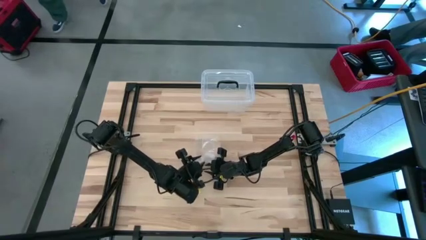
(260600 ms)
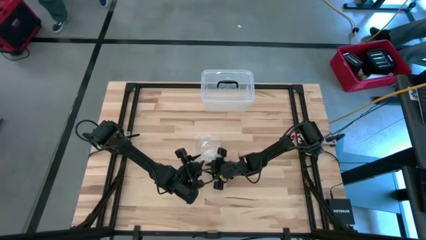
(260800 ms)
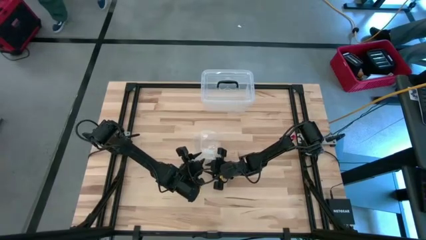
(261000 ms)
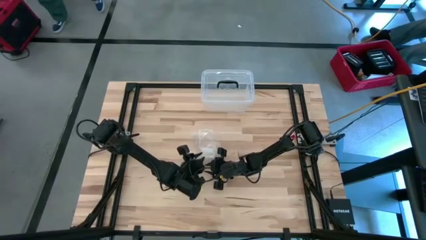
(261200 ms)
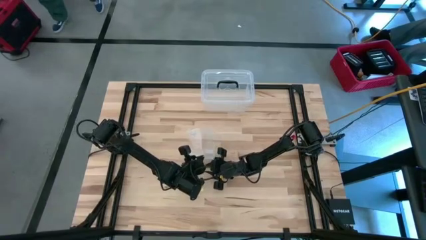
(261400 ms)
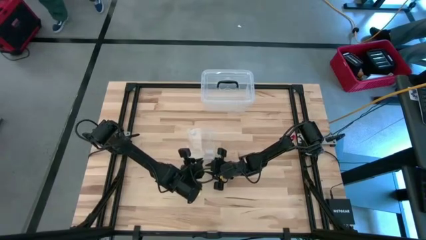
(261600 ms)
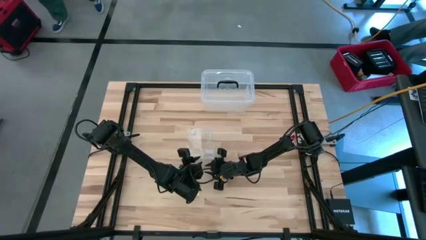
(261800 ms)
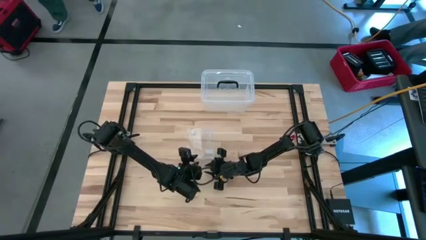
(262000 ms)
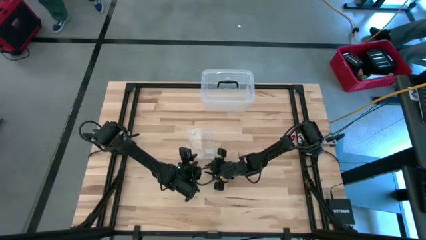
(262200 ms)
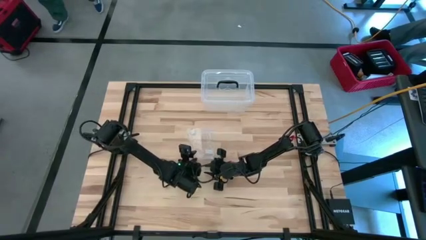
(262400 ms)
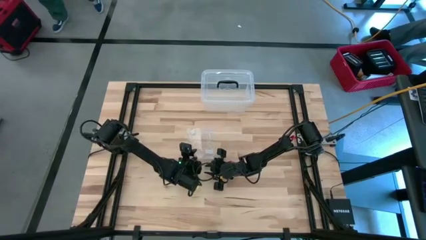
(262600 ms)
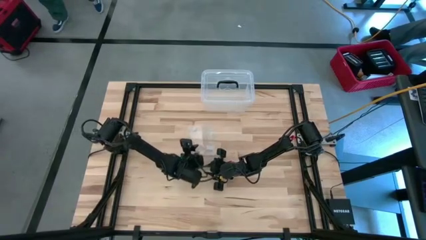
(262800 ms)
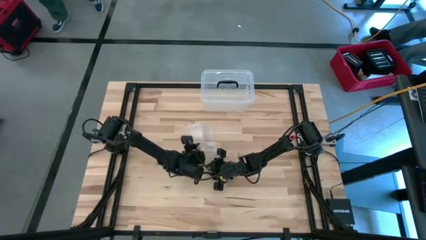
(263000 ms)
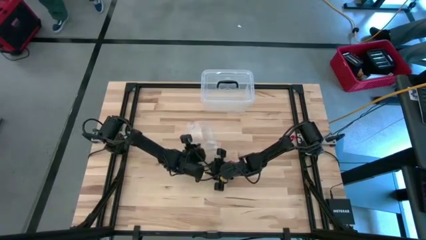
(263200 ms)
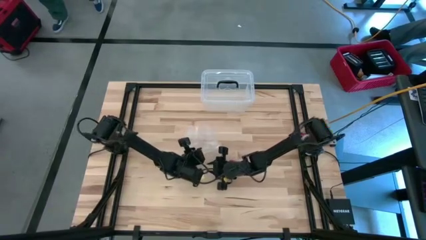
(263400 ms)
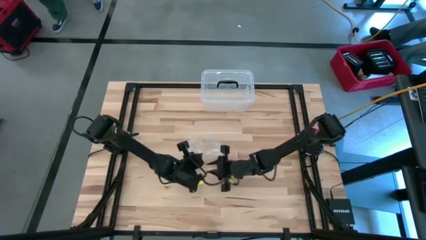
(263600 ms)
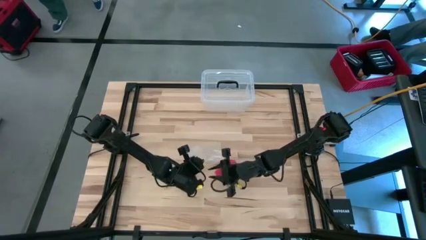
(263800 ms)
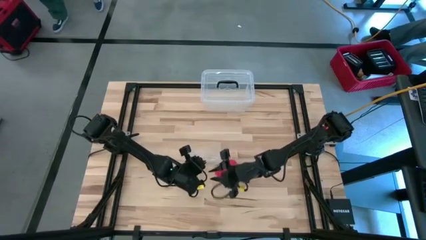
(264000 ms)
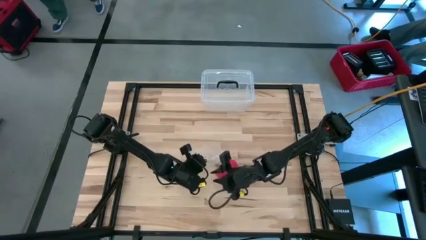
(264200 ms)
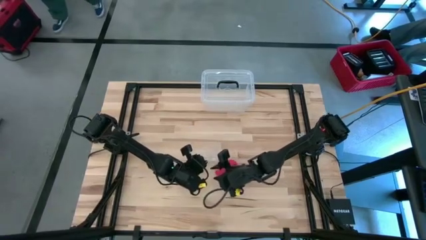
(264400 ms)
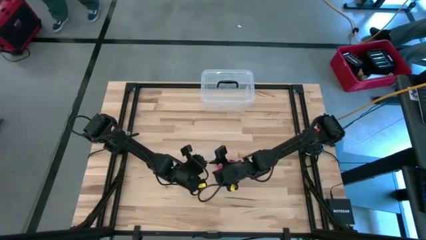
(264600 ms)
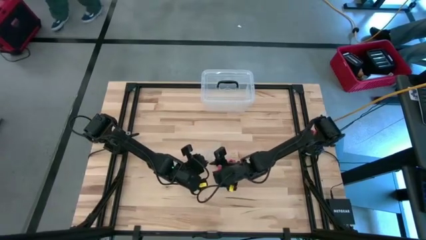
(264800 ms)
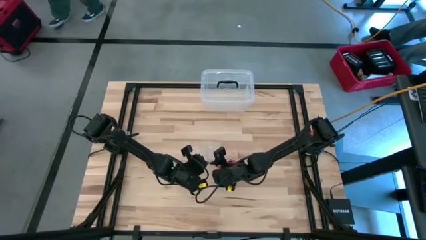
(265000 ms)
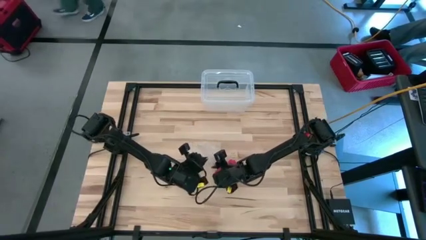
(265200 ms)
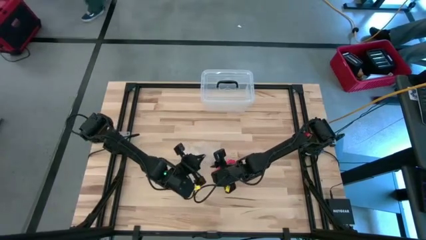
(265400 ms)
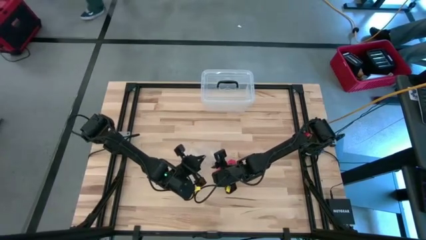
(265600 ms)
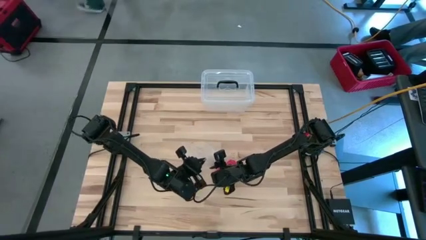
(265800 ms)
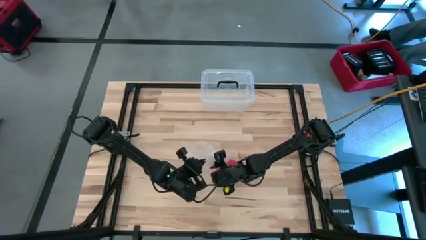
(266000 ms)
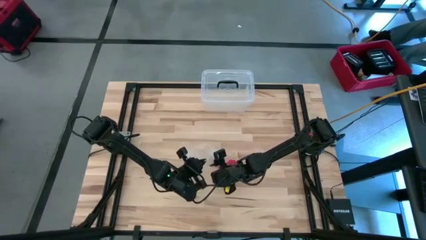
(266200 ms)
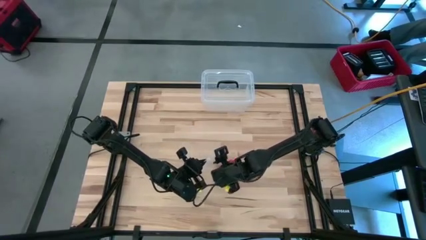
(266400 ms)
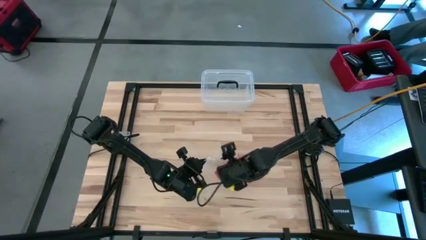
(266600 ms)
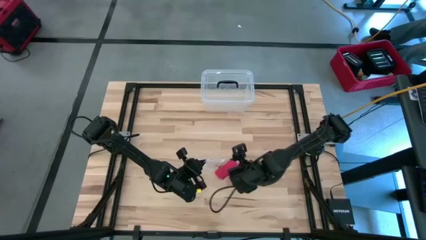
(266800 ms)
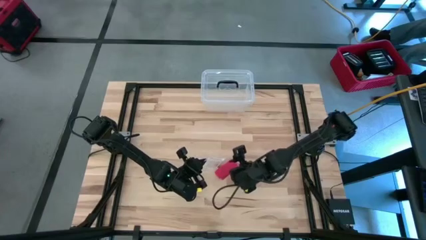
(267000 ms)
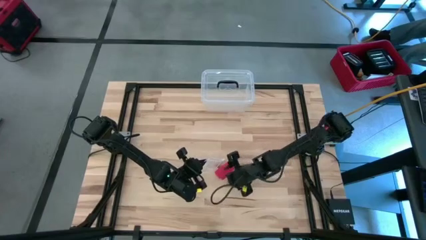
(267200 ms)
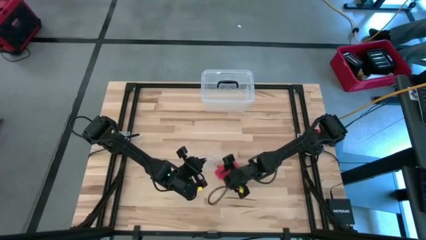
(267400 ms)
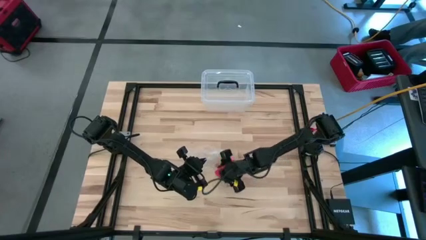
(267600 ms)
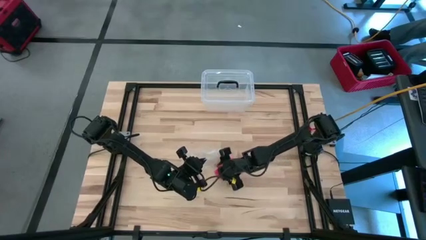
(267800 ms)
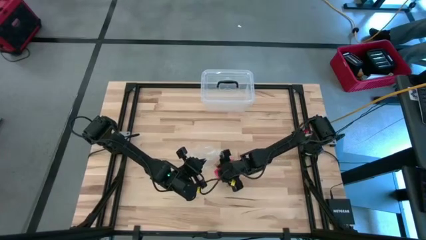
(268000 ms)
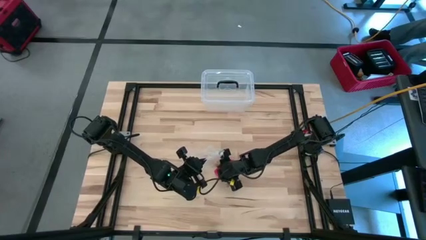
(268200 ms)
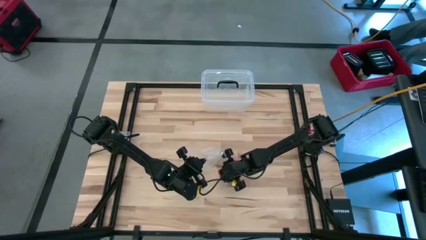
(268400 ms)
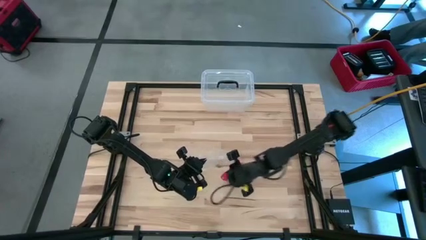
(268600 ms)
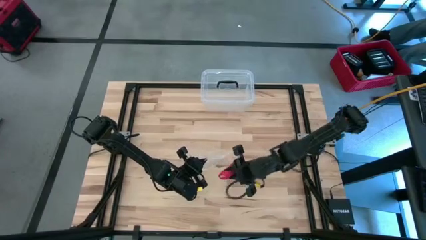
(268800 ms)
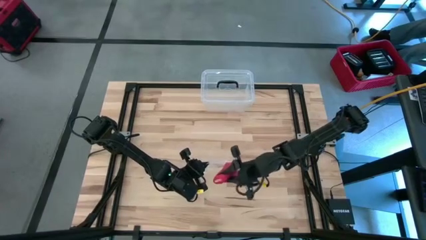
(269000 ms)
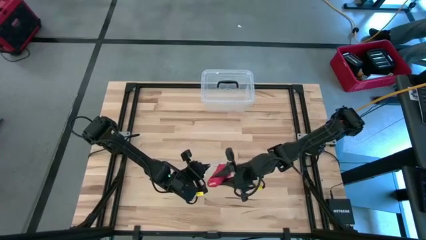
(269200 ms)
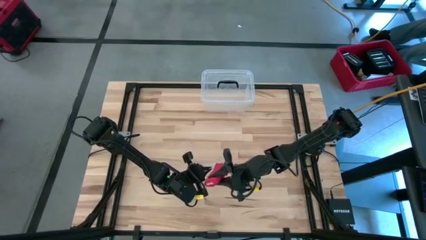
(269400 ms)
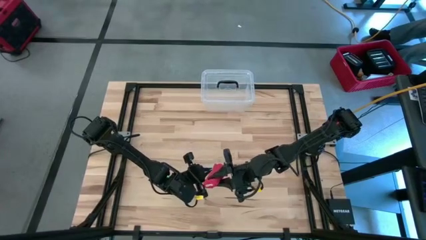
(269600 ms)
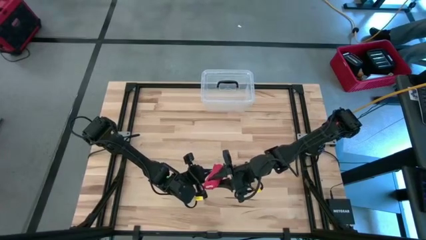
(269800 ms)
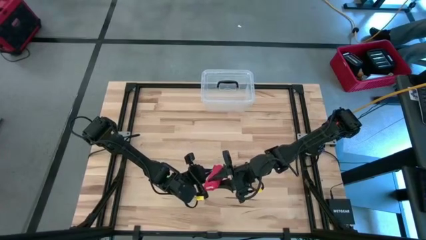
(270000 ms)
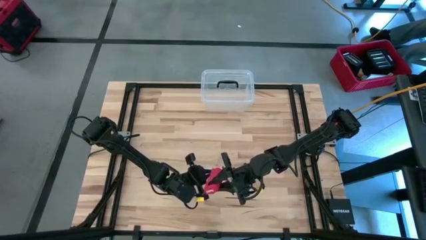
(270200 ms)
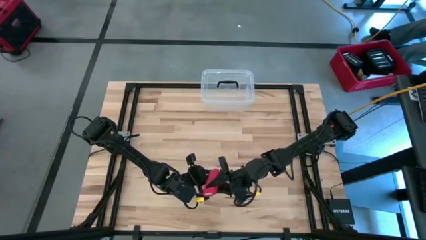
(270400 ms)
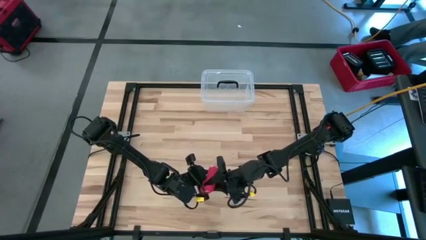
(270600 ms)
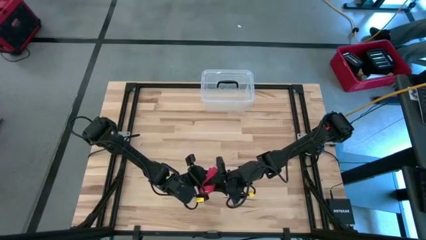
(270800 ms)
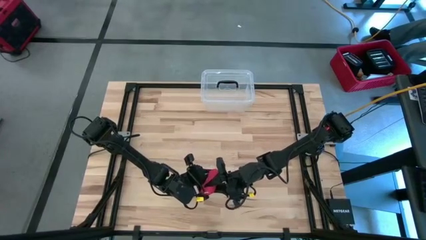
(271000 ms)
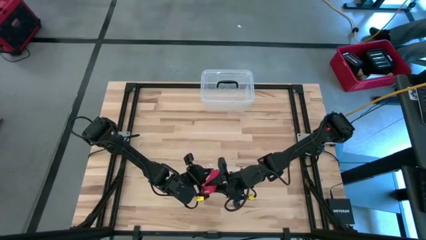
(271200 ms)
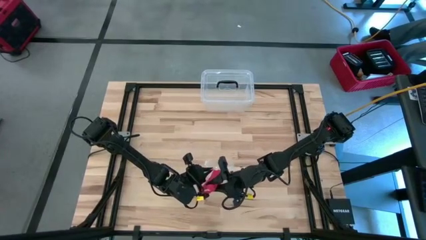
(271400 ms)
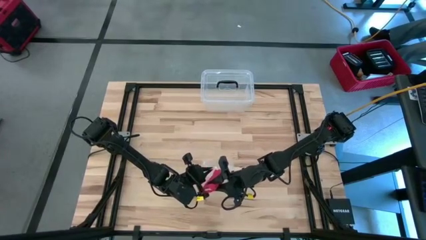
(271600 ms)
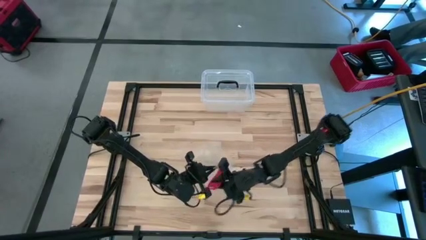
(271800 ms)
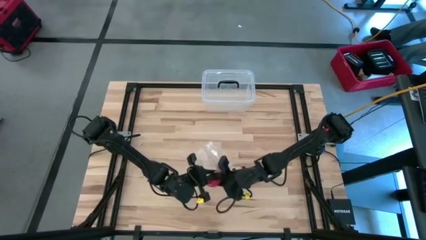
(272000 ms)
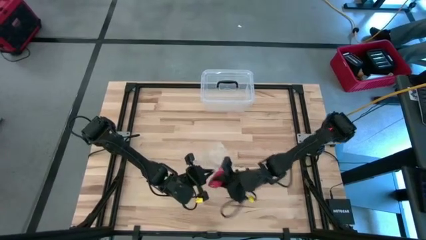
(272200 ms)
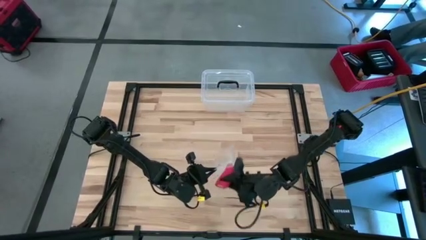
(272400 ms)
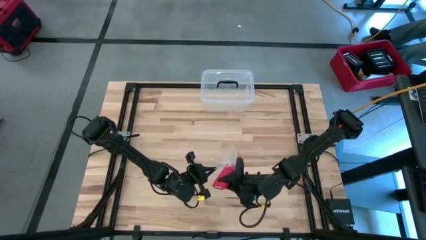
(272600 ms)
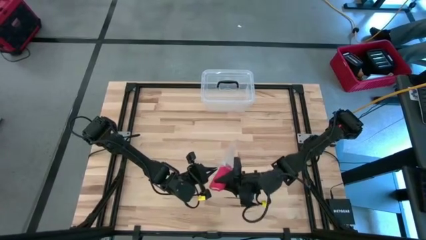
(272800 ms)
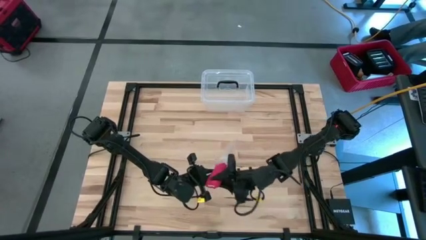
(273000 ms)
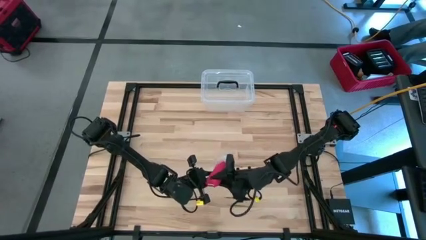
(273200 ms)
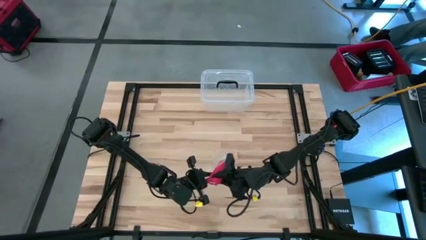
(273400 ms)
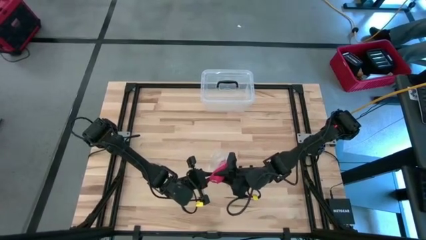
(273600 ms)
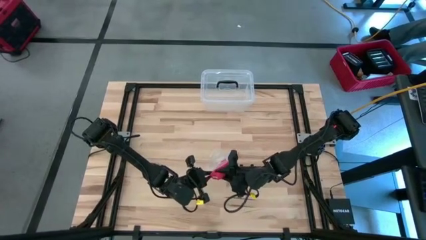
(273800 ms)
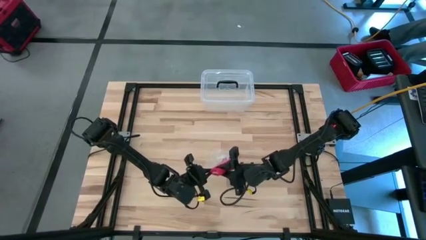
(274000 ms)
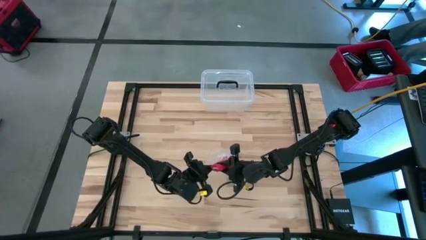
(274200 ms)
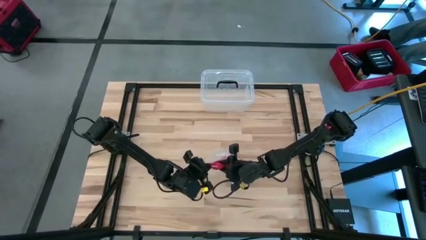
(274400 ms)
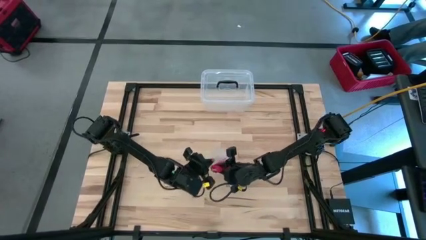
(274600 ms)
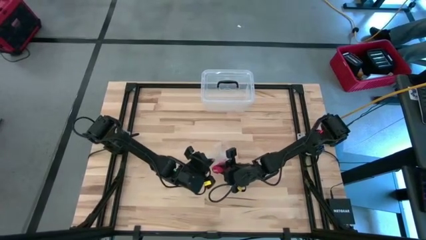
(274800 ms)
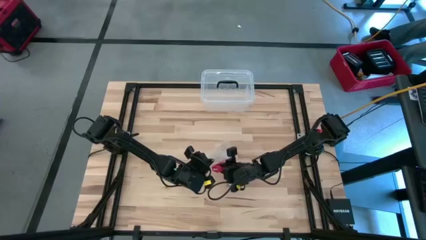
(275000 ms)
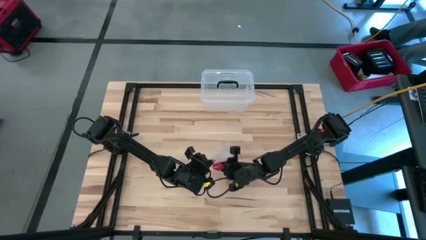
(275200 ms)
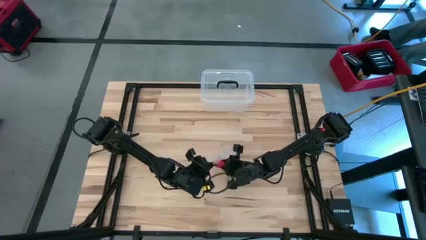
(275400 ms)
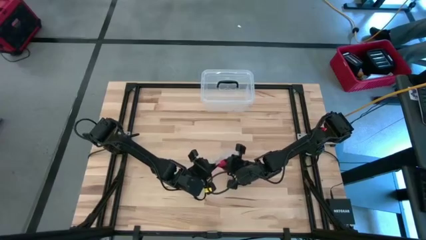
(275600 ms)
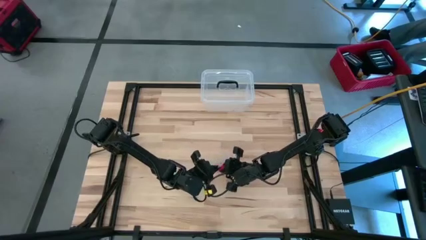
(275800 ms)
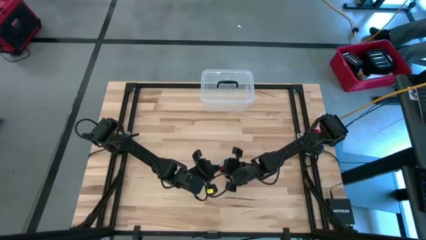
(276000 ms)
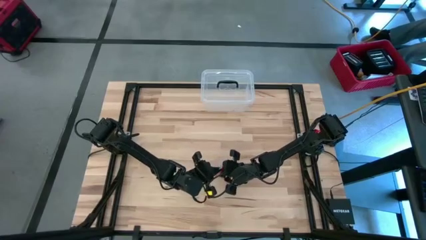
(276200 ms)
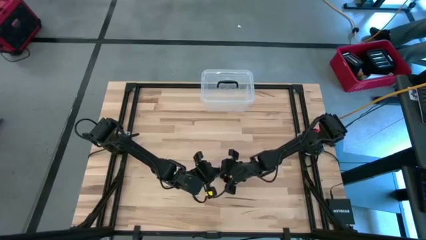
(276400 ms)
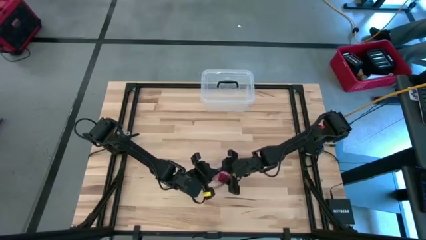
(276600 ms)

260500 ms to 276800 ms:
Task: Roll bandage
Put the red bandage into the transparent zip bag
